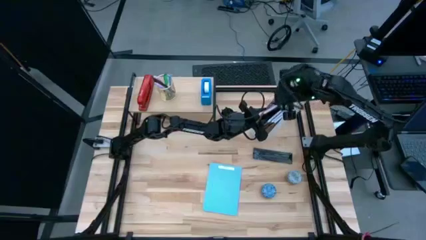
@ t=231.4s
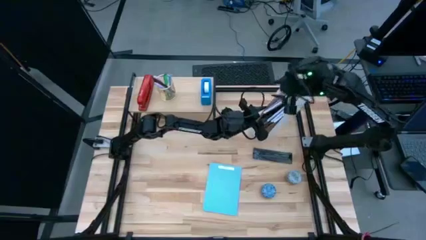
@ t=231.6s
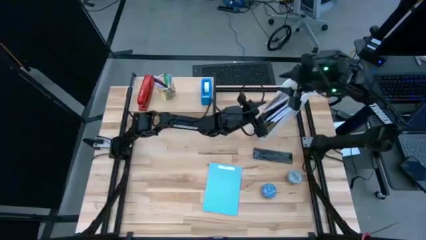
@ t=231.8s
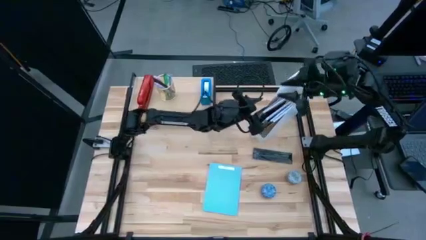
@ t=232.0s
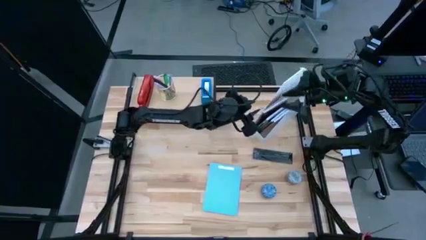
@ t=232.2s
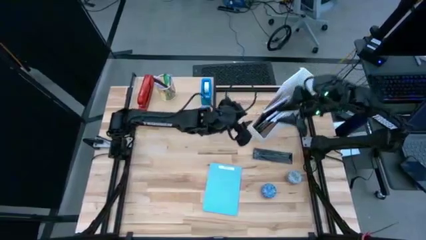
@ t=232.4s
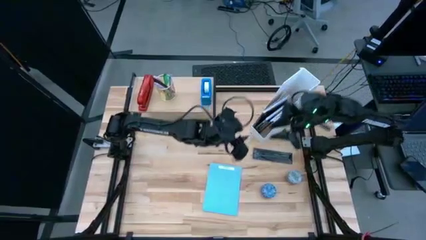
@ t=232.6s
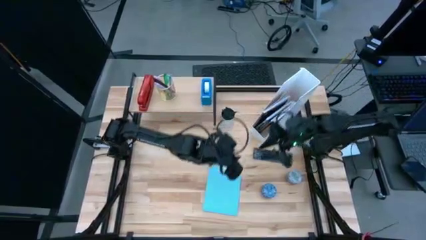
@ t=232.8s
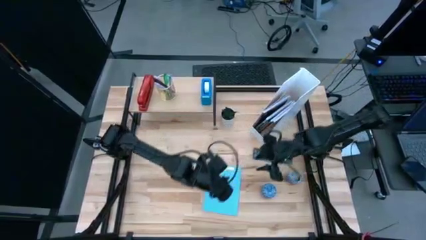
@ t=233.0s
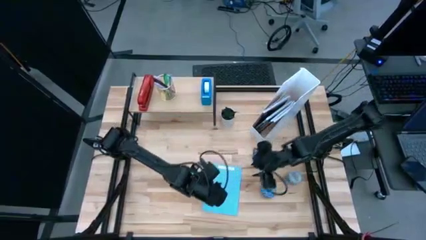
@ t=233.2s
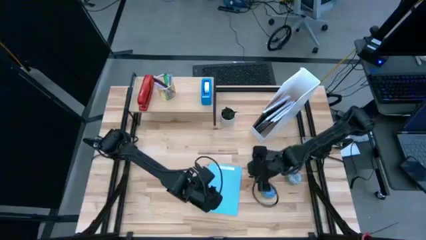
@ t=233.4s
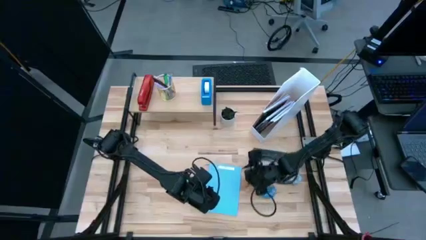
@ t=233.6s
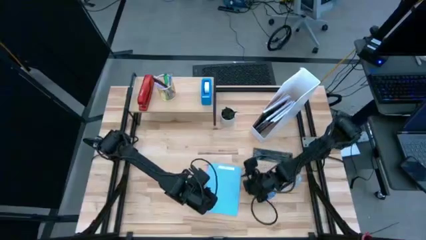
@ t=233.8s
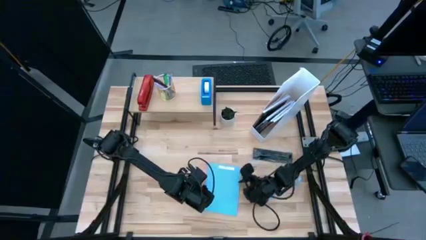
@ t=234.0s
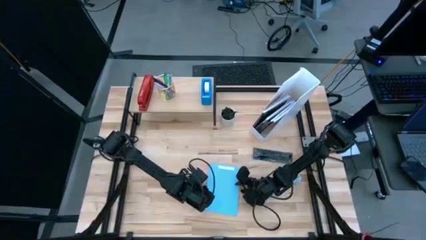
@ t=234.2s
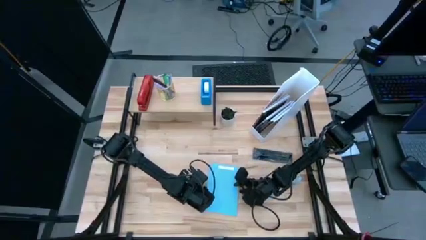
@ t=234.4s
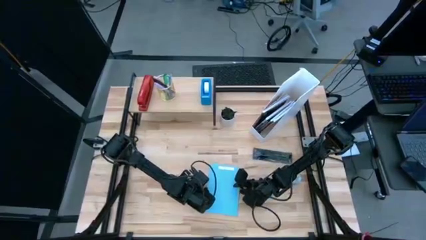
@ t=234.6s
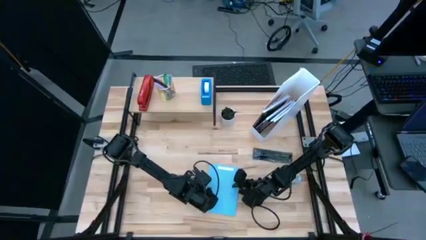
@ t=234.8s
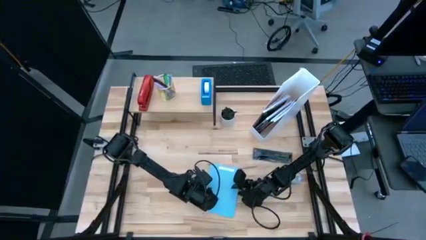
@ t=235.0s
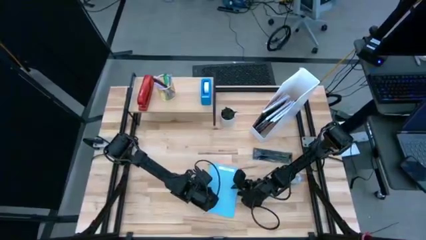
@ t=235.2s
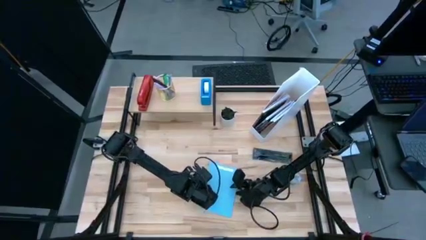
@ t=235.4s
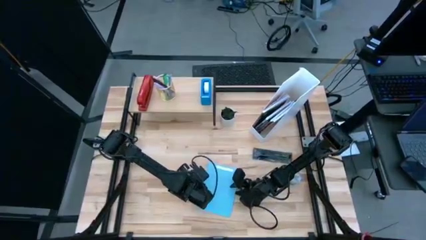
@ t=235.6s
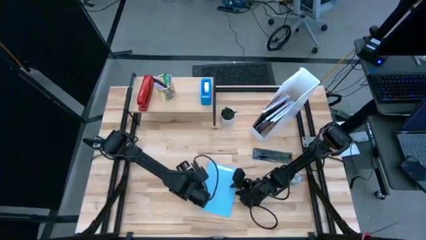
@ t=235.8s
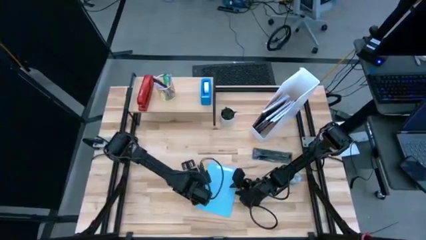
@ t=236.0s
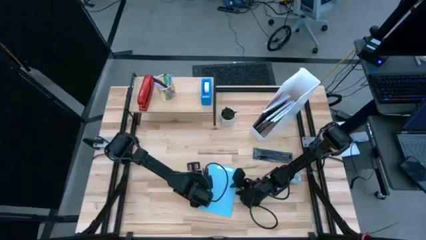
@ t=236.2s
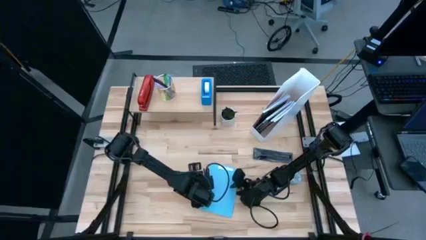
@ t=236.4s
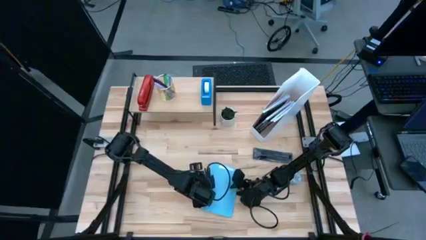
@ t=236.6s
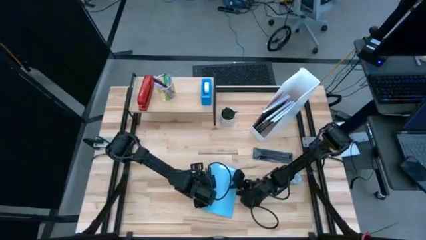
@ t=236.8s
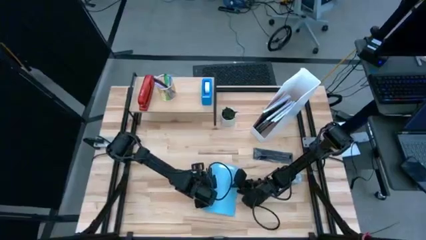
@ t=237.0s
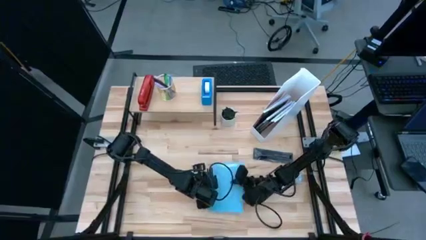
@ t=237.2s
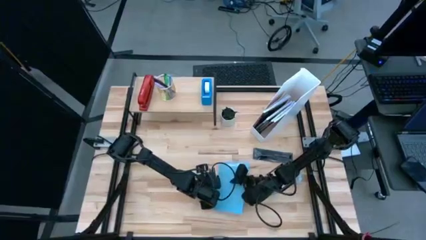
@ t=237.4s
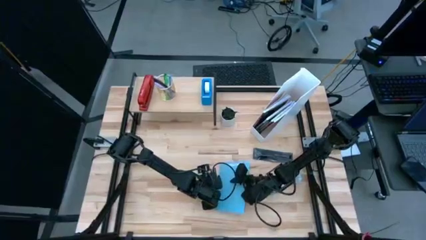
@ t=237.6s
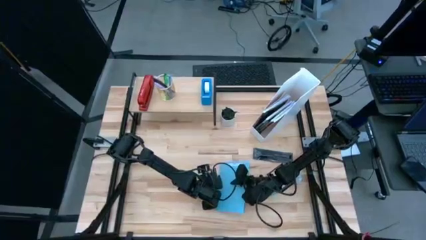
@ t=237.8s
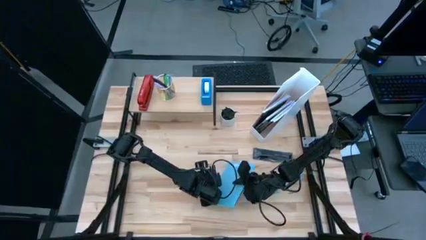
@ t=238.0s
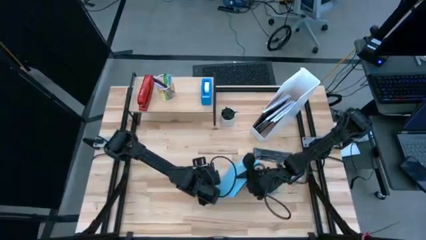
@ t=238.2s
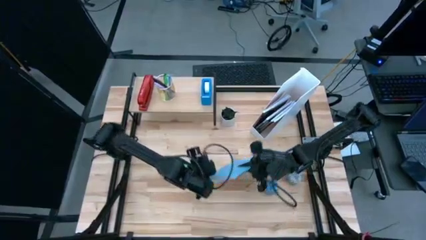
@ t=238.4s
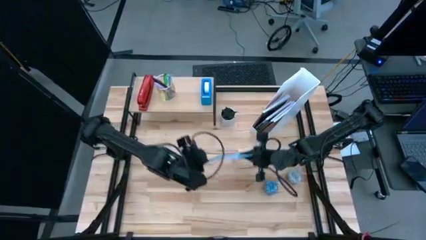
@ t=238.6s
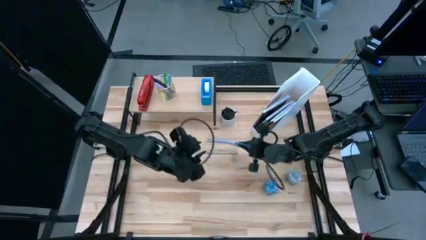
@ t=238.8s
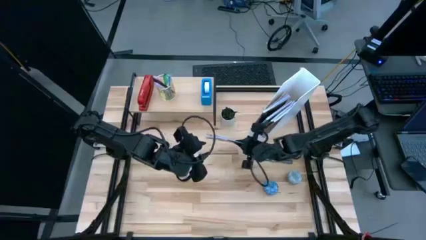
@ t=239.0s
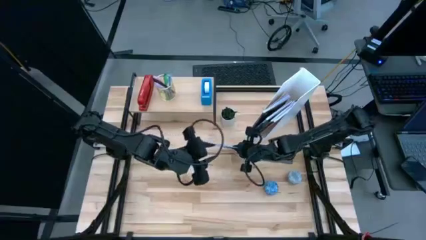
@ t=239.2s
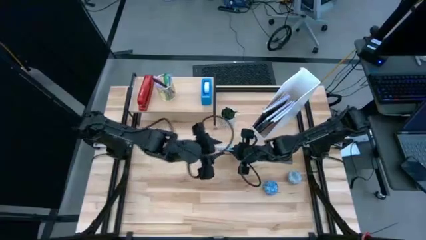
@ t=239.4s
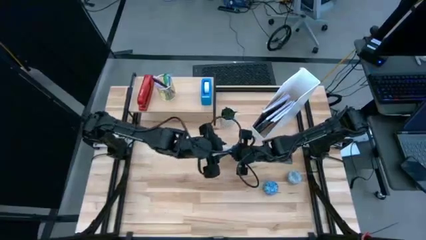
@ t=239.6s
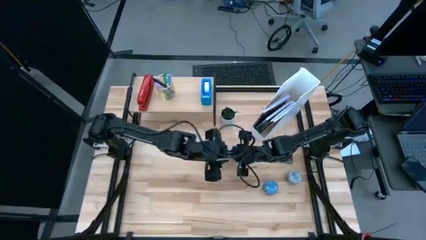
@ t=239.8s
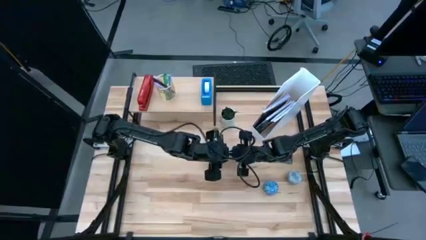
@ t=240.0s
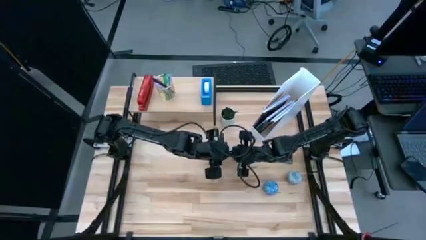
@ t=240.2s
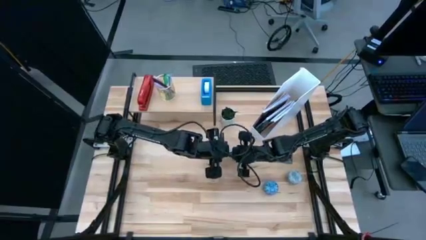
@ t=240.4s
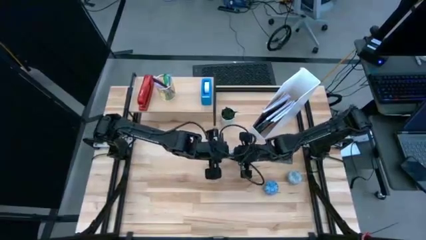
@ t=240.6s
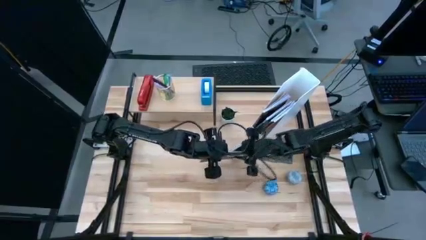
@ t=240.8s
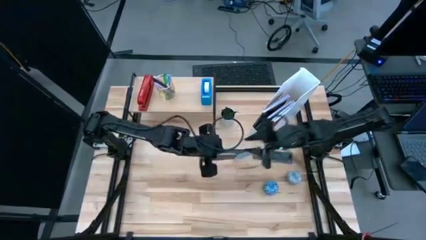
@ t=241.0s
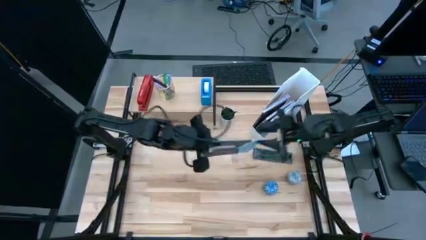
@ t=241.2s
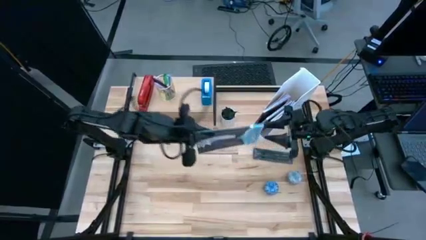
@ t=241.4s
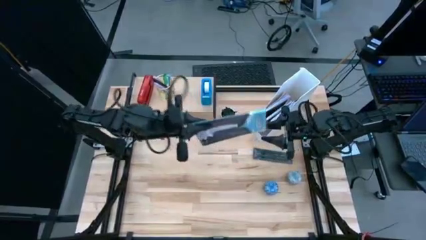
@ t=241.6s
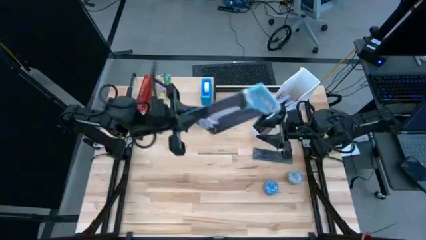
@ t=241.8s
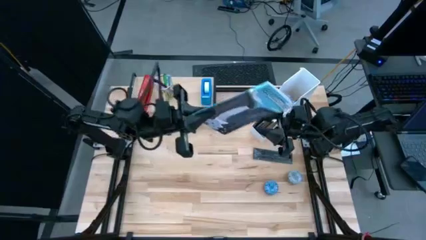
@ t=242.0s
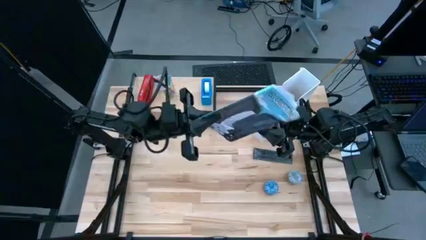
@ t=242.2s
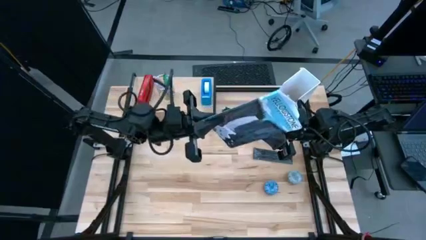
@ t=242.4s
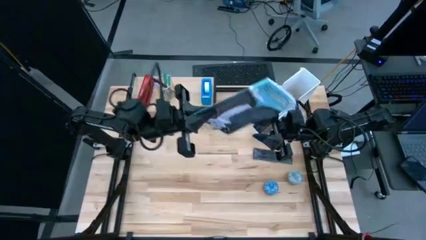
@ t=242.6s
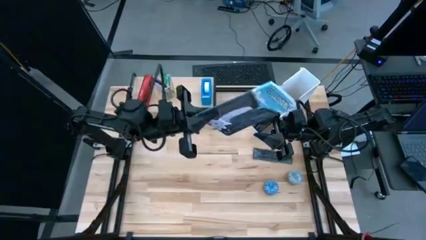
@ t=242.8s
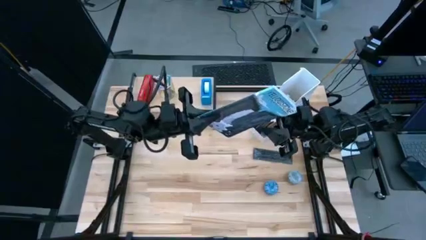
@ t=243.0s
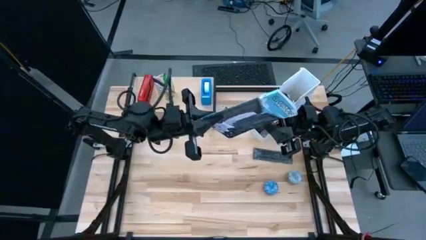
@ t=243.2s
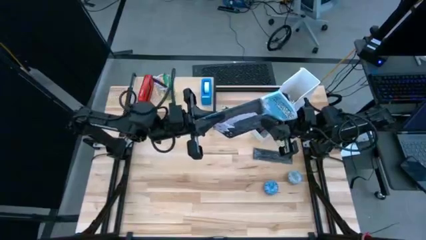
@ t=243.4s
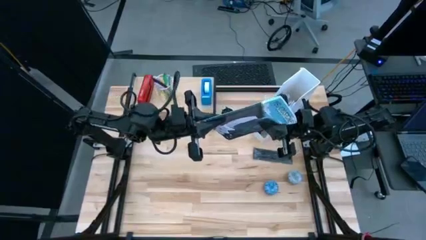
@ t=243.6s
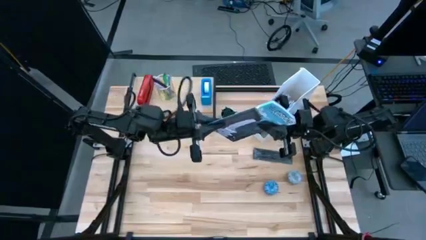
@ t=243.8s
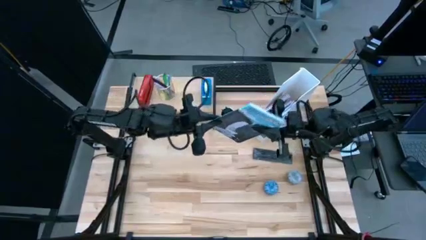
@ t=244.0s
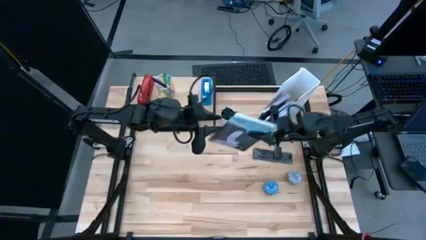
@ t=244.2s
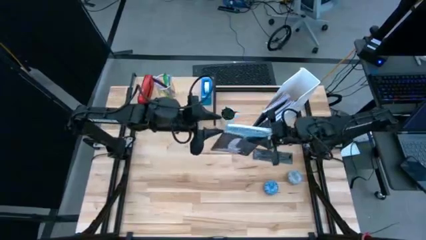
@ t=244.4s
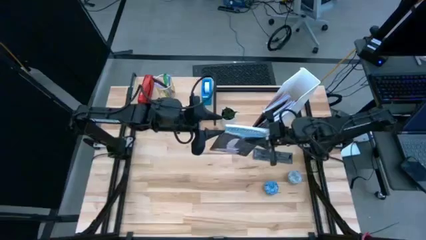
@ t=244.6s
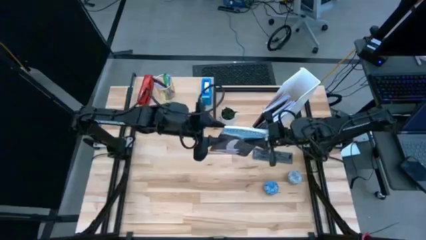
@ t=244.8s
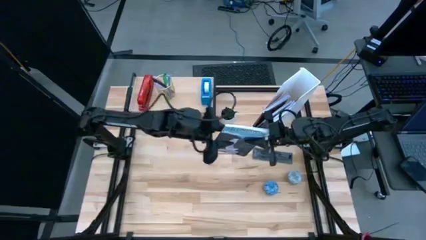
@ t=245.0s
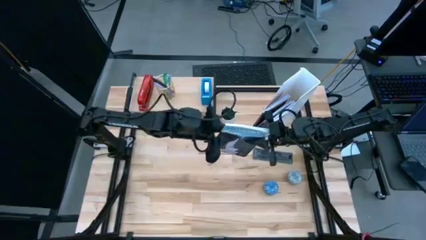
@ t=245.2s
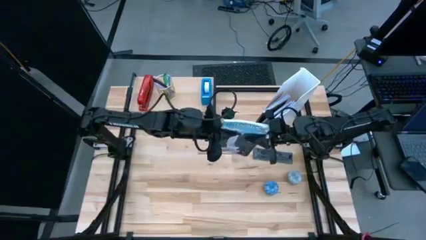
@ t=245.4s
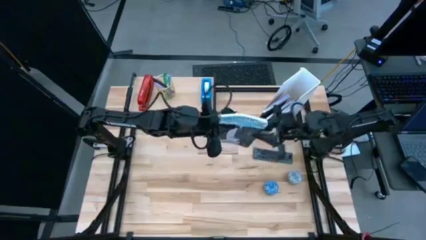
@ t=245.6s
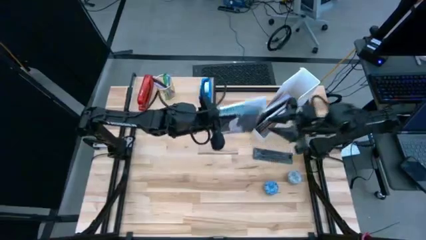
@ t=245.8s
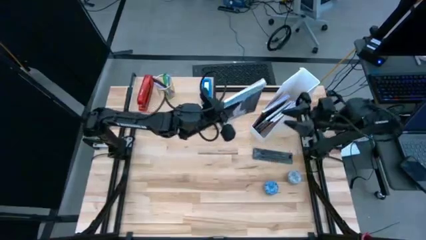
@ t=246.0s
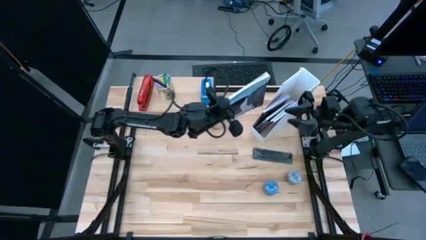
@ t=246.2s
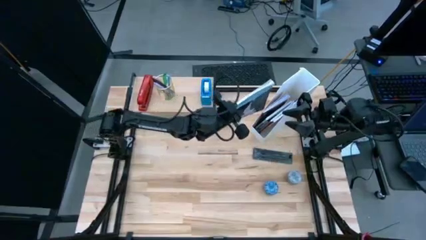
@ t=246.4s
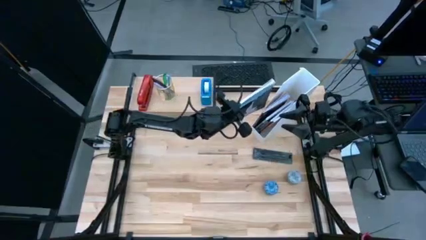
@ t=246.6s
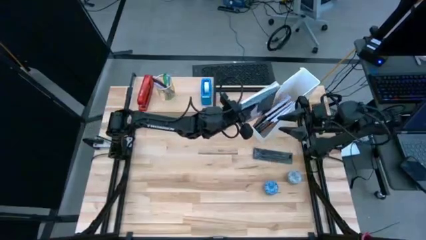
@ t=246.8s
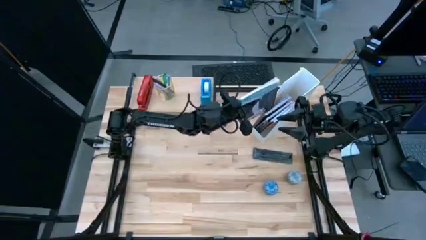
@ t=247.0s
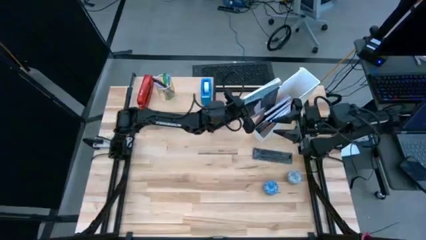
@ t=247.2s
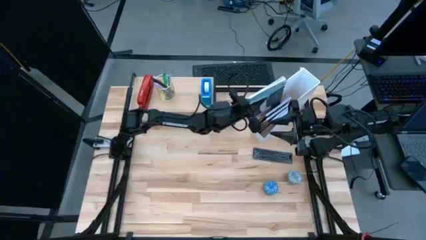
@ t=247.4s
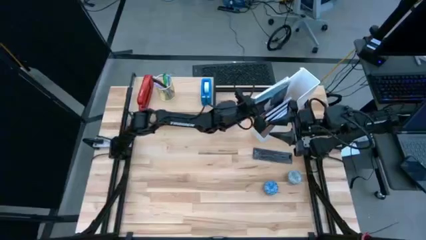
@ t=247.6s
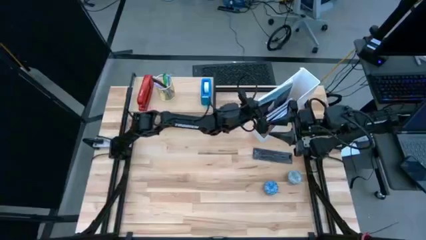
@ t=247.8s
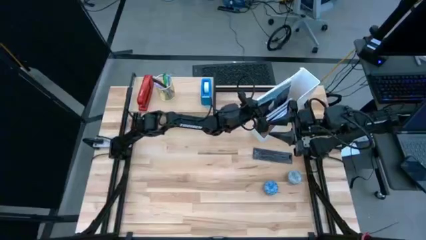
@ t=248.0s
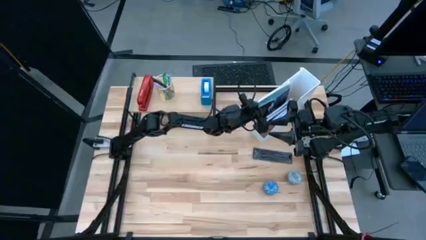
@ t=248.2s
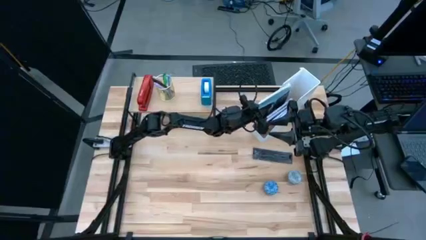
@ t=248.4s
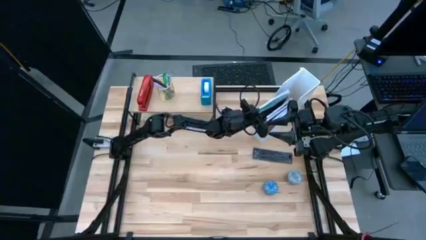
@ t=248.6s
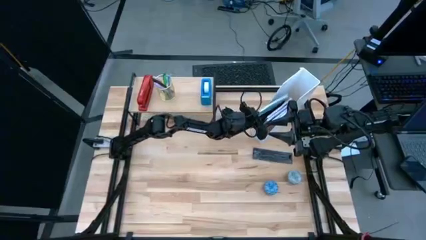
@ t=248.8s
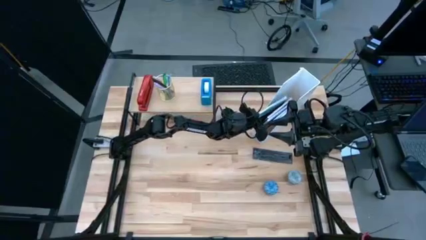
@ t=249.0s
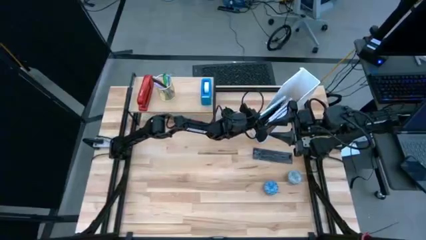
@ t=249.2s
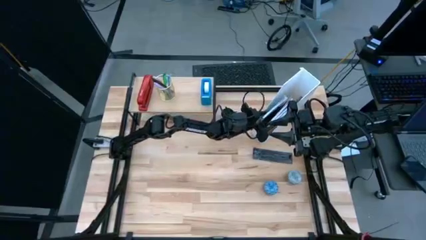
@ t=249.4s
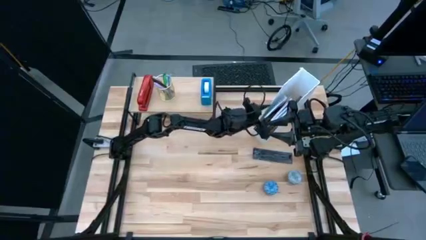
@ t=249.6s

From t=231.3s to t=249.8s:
Task: Stock shelves
Put the blue book into the white book shelf
